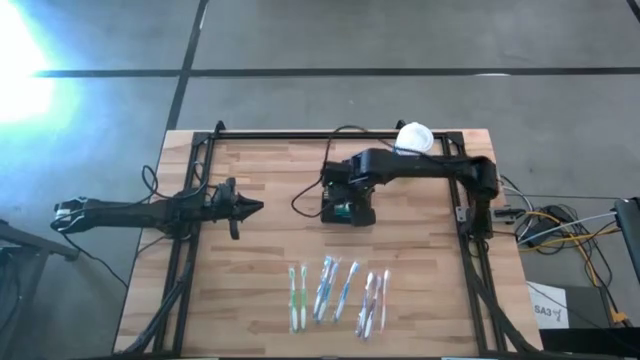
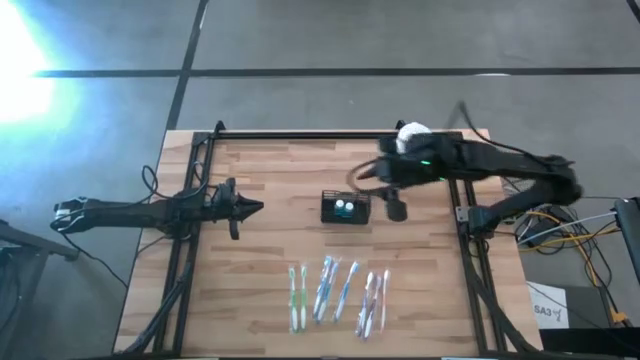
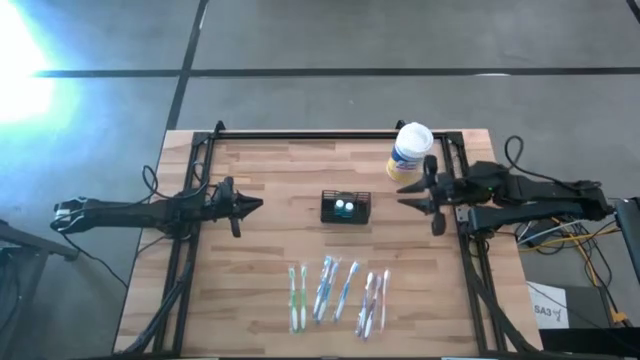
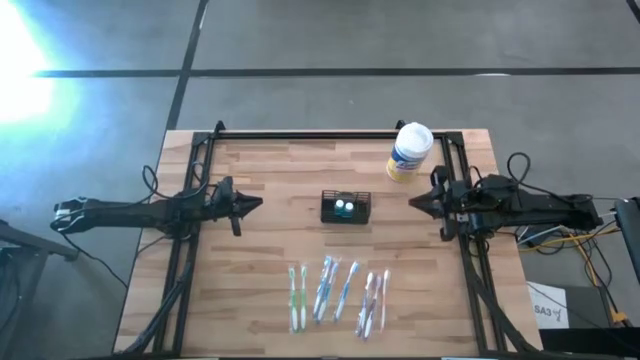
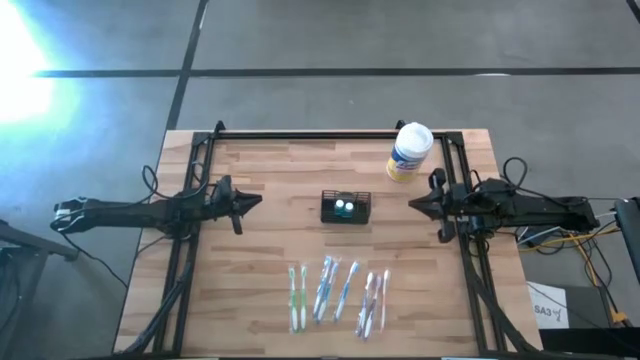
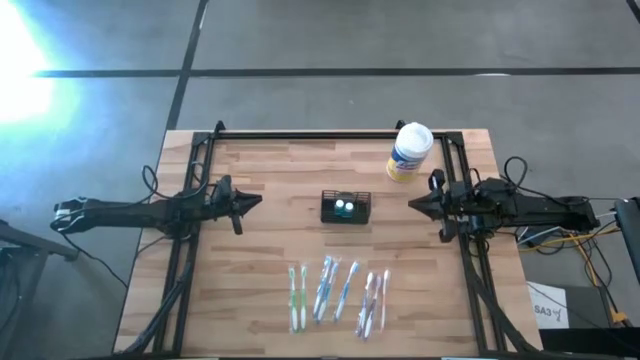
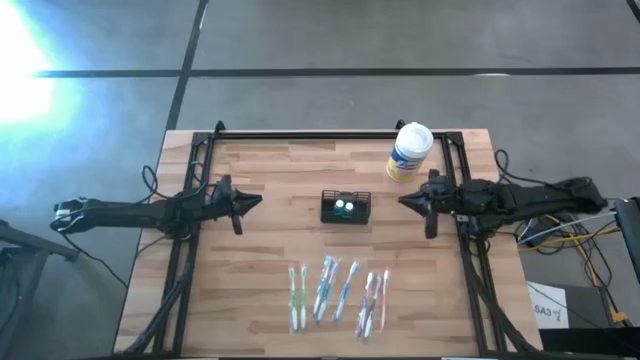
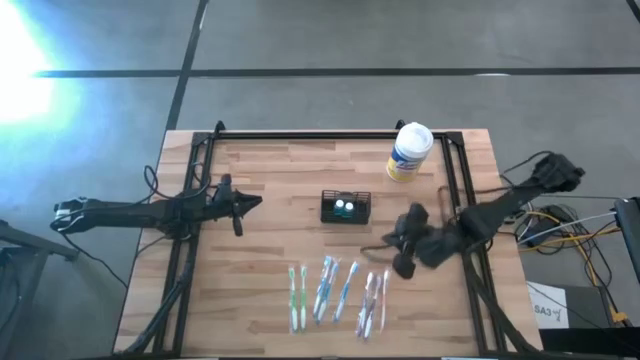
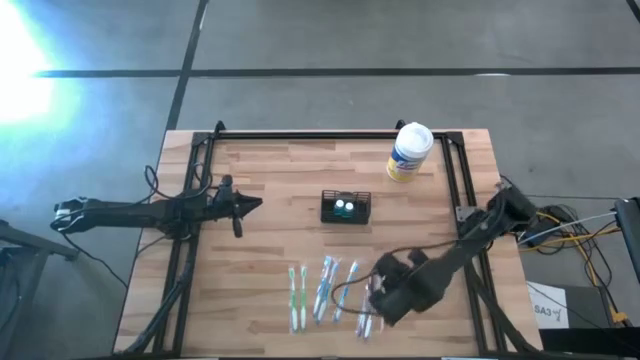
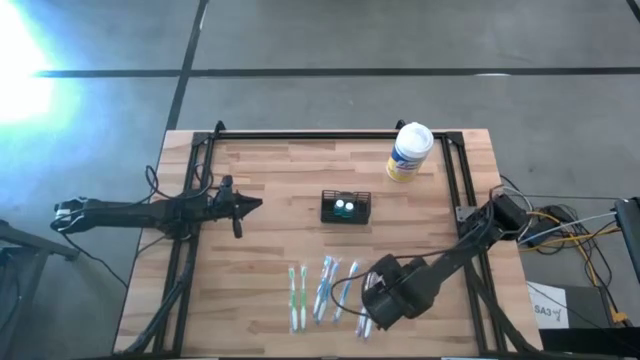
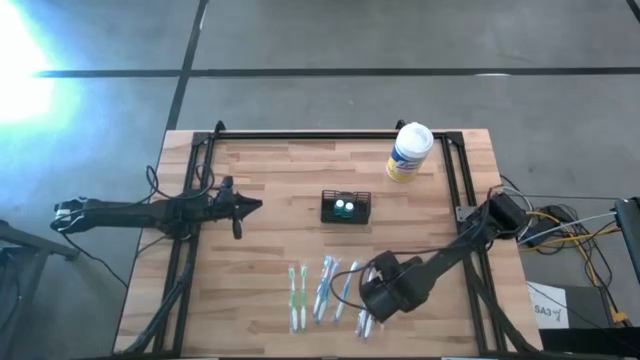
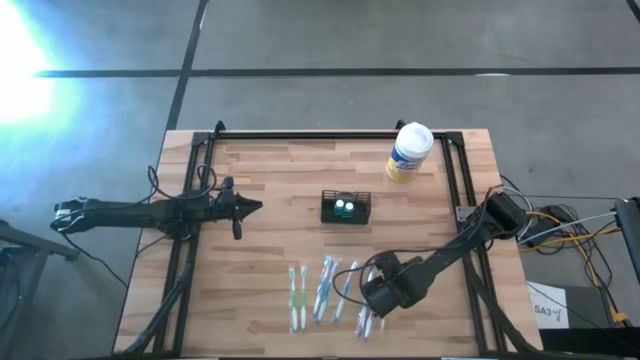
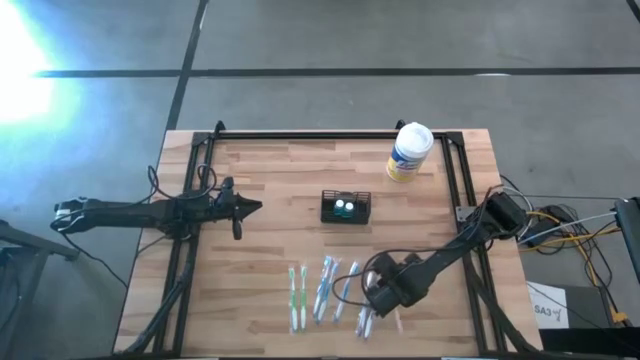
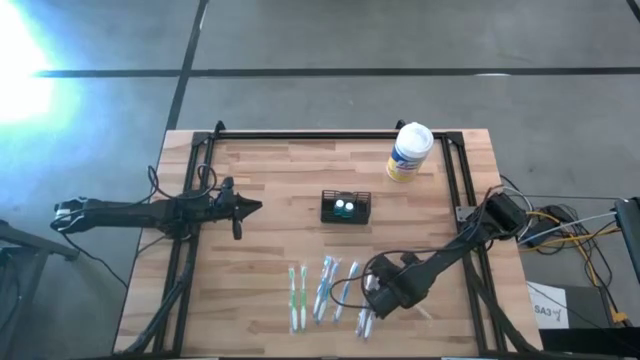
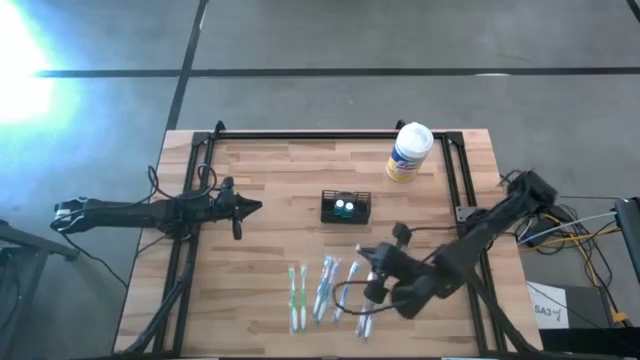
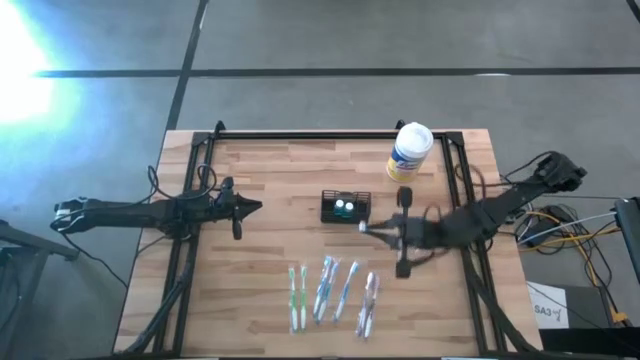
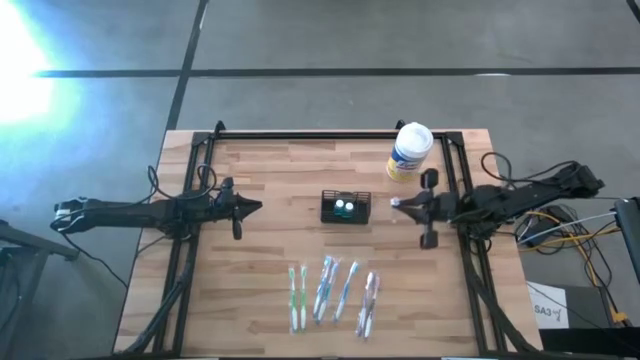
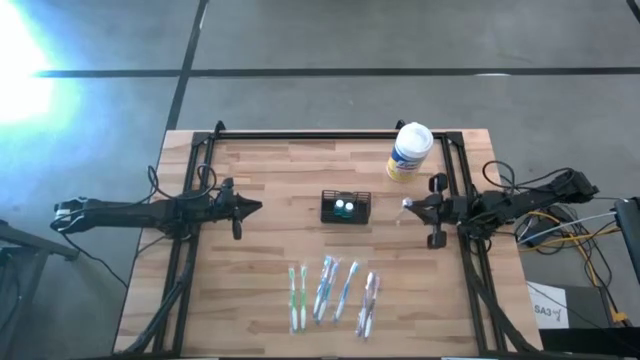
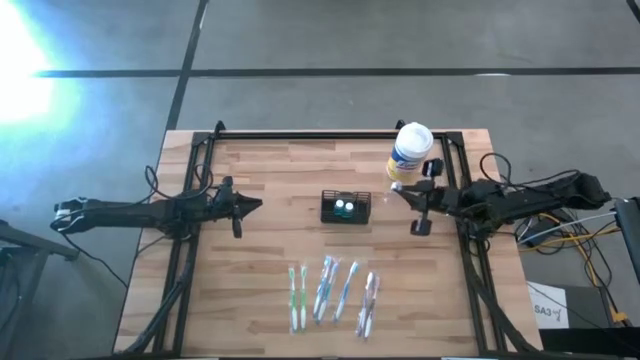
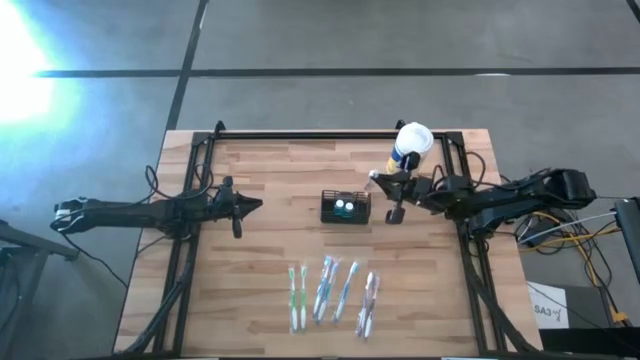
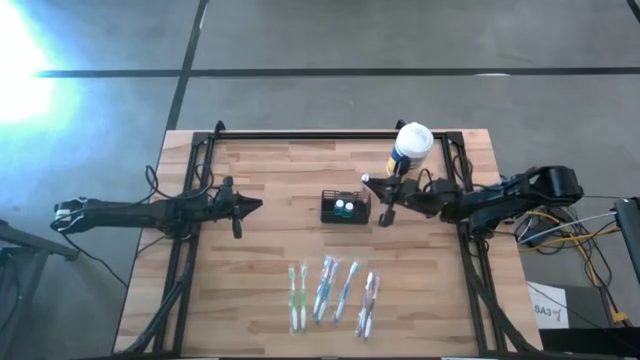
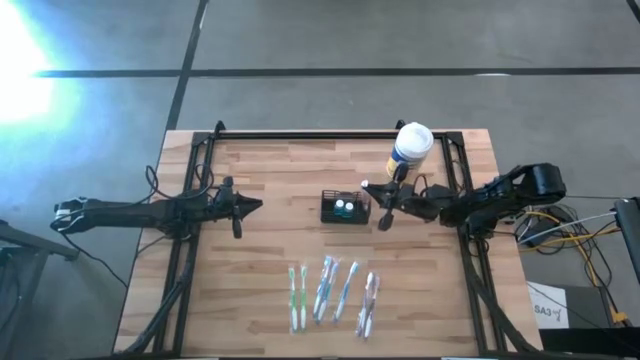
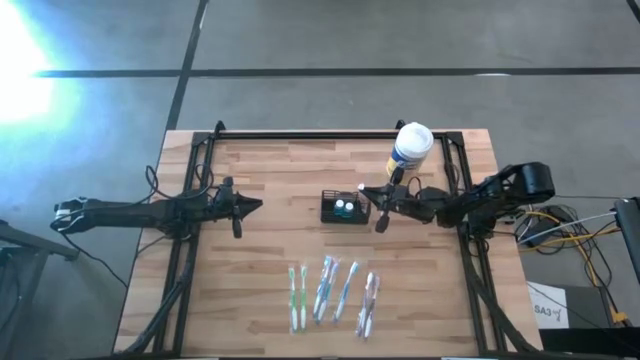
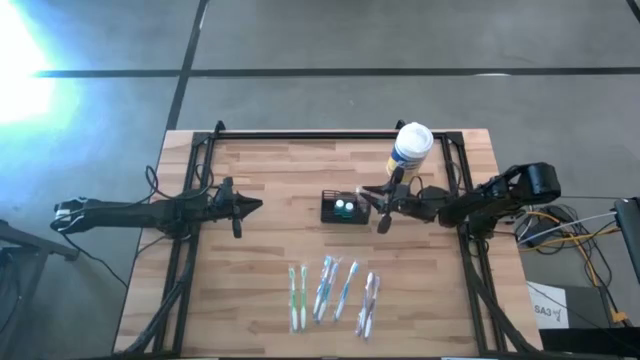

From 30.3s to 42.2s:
Task: Pick & Place toothbrushing station
Put the orange toothbrush into the wire organizer

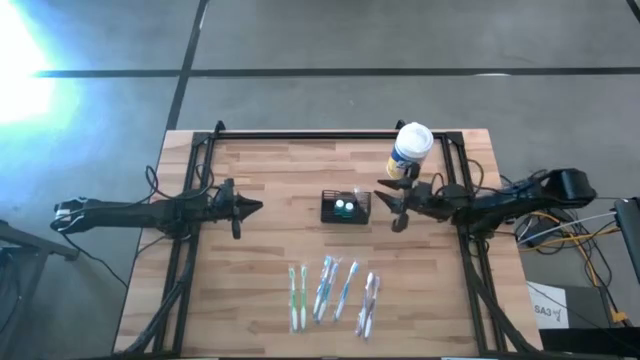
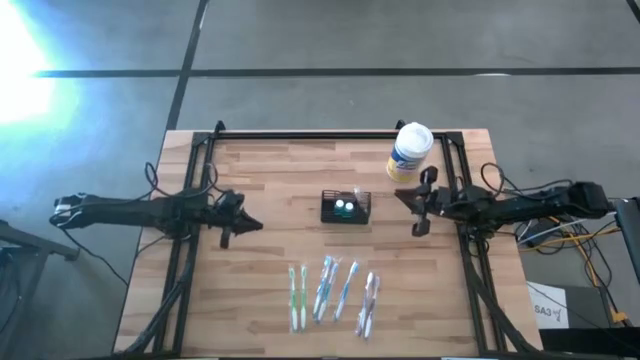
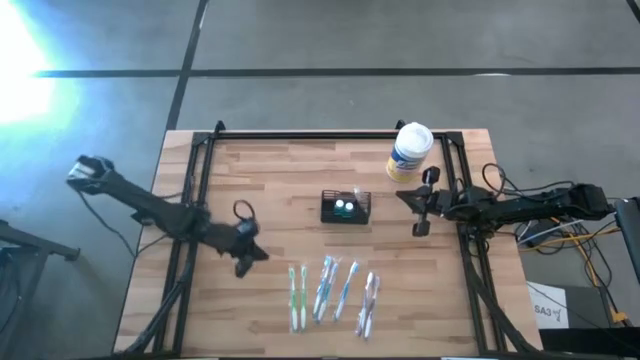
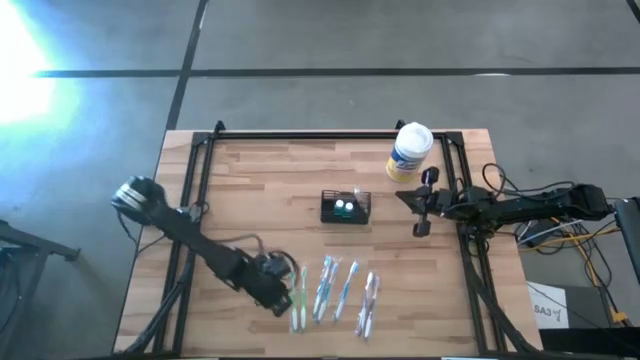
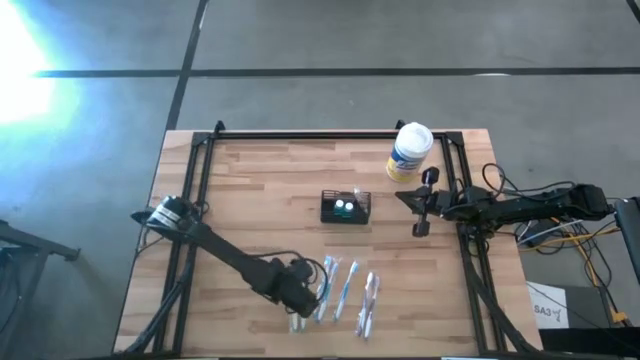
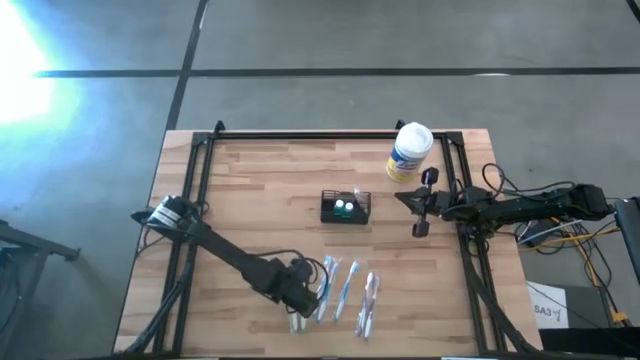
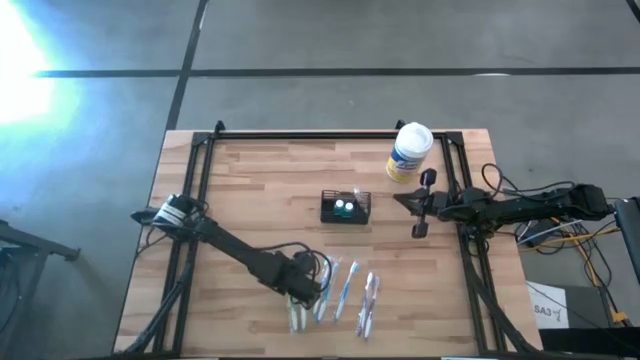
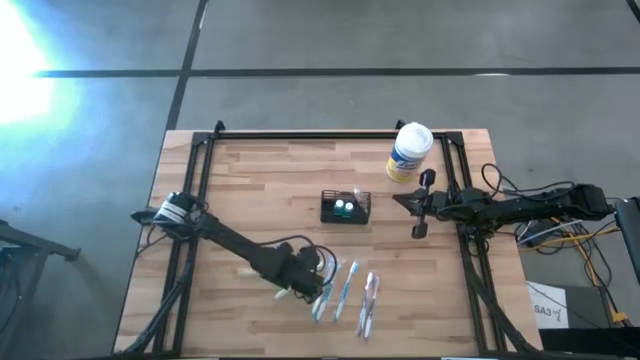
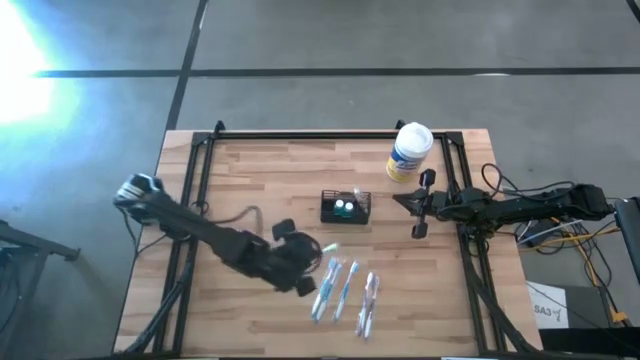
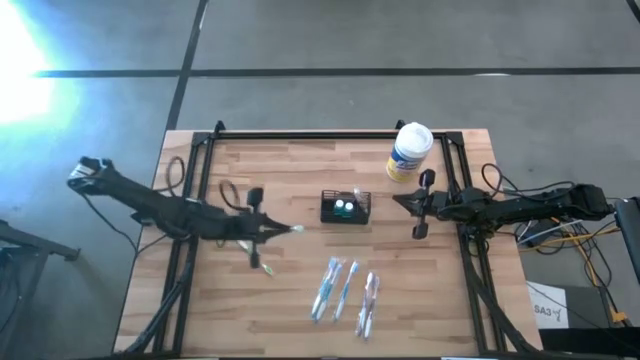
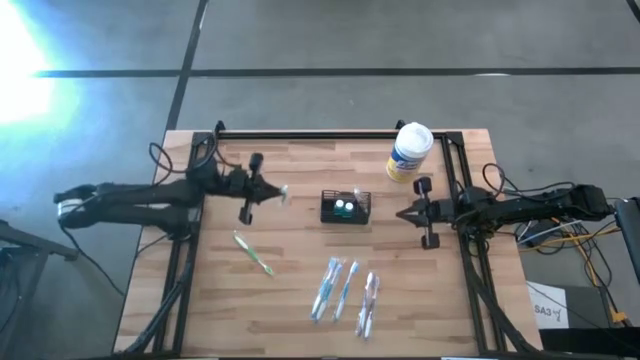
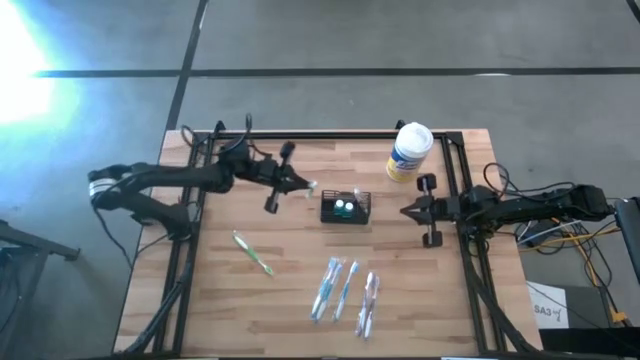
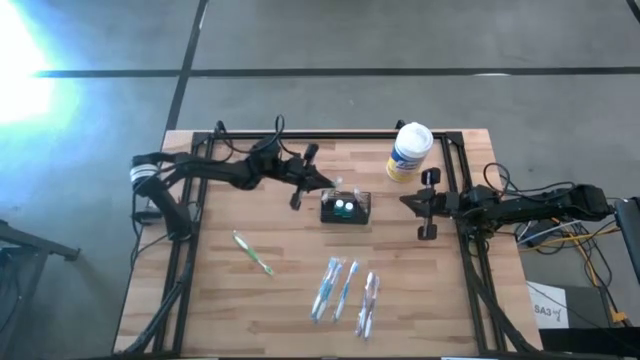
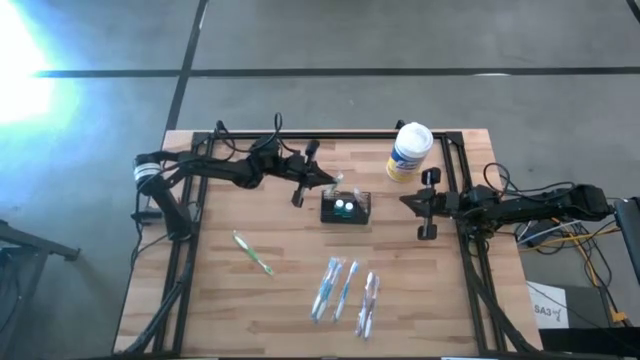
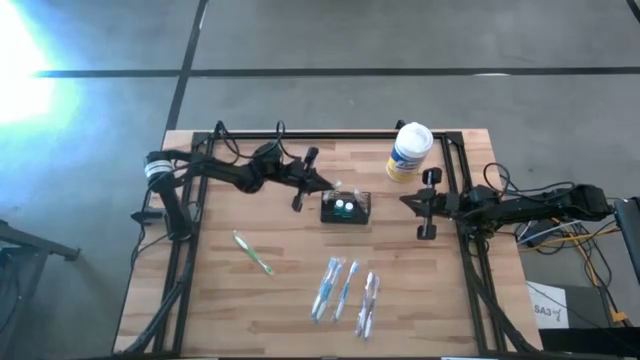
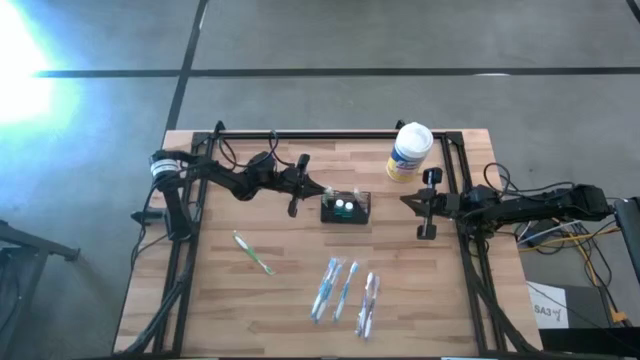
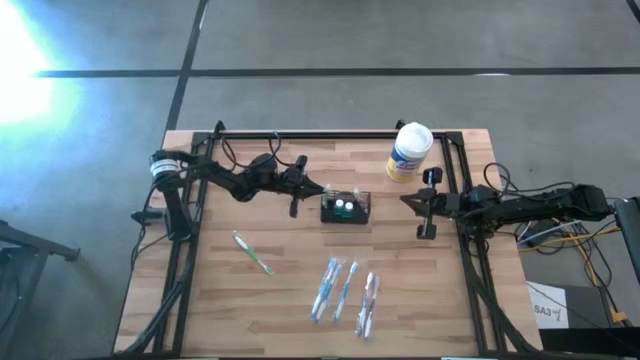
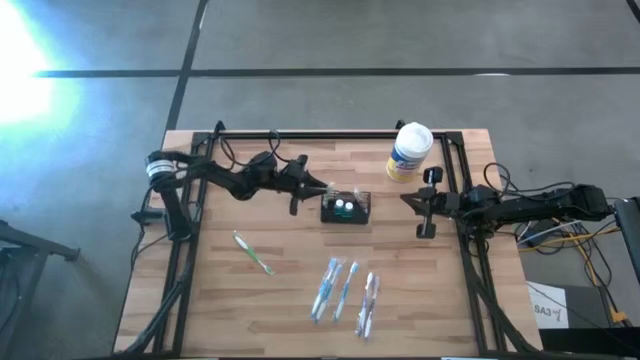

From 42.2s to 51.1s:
Put the right green toothbrush into the wire organizer
